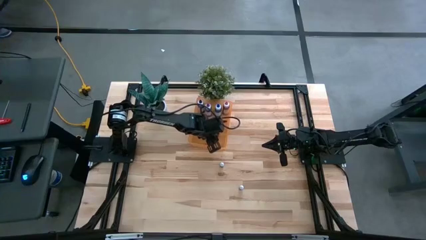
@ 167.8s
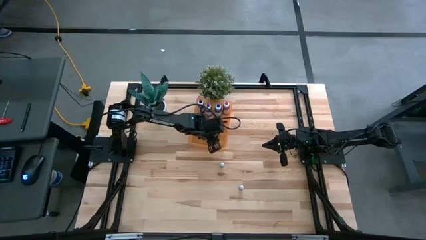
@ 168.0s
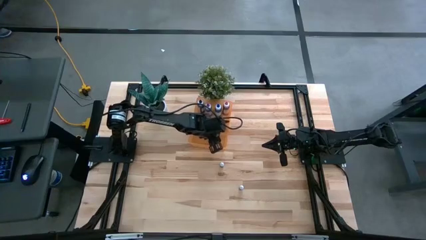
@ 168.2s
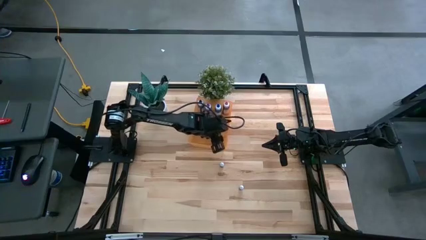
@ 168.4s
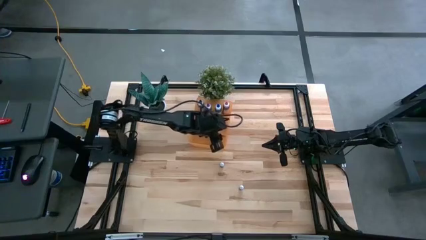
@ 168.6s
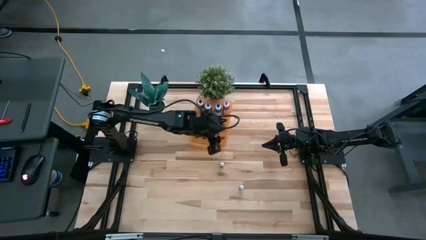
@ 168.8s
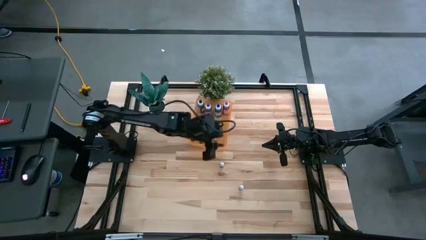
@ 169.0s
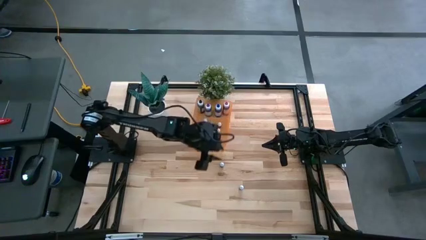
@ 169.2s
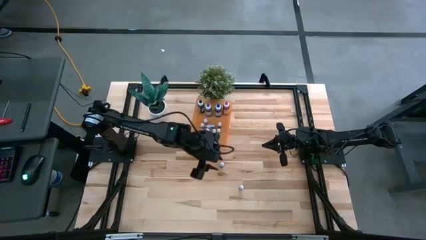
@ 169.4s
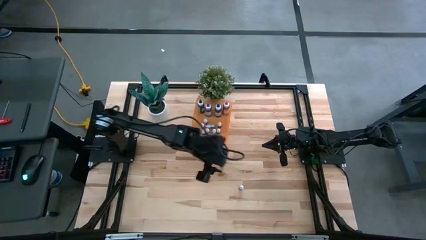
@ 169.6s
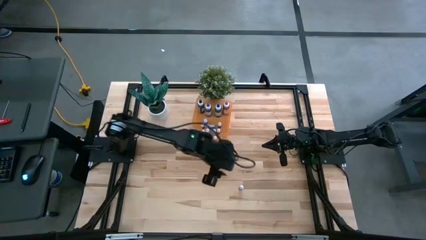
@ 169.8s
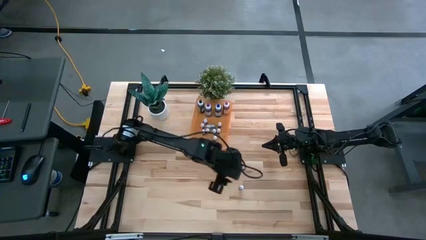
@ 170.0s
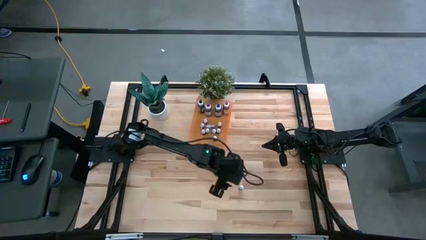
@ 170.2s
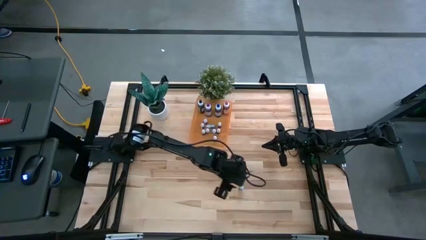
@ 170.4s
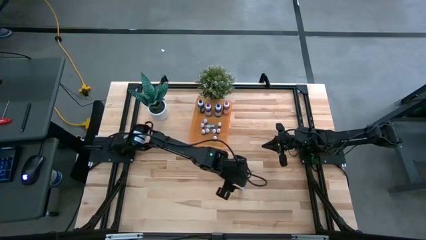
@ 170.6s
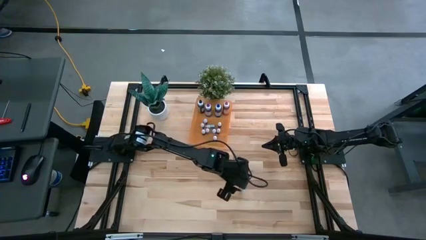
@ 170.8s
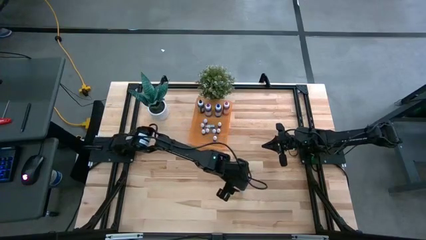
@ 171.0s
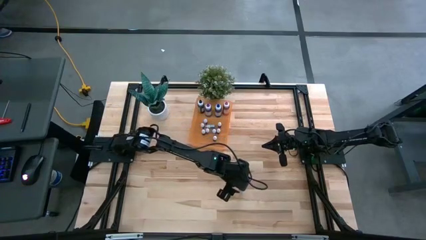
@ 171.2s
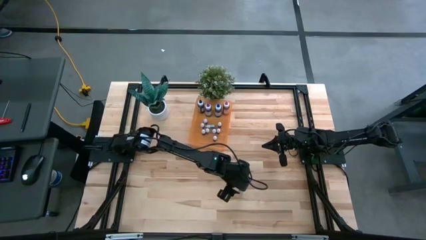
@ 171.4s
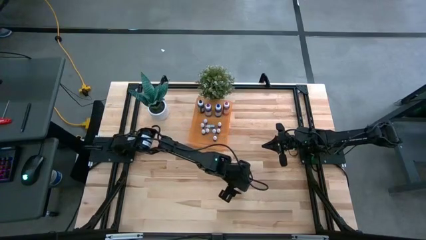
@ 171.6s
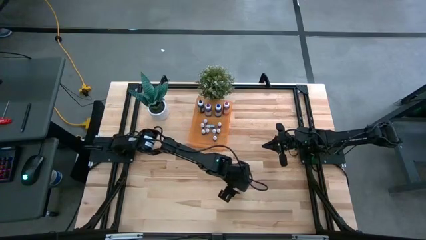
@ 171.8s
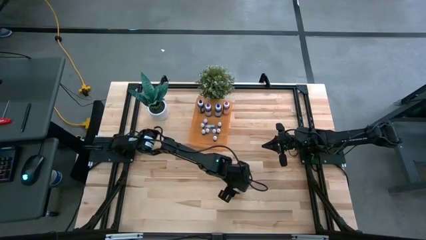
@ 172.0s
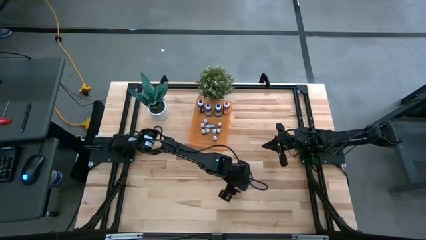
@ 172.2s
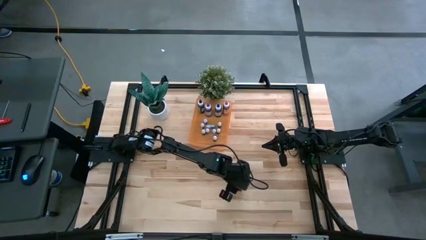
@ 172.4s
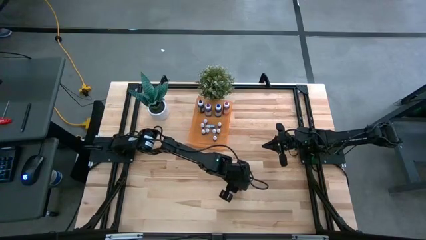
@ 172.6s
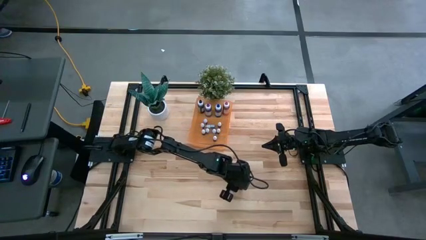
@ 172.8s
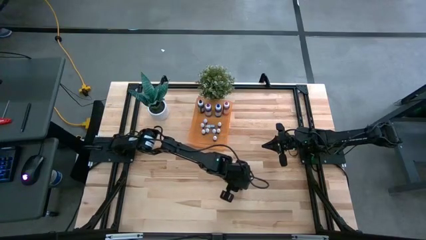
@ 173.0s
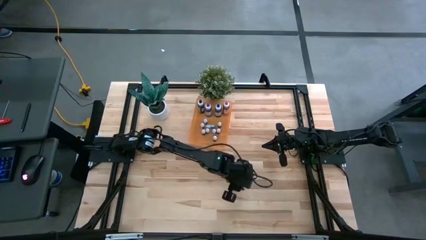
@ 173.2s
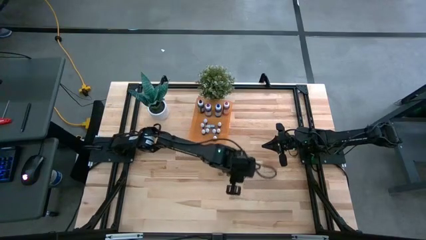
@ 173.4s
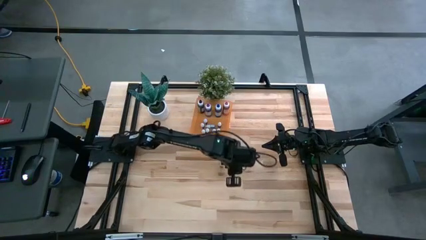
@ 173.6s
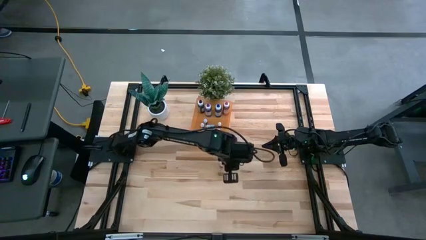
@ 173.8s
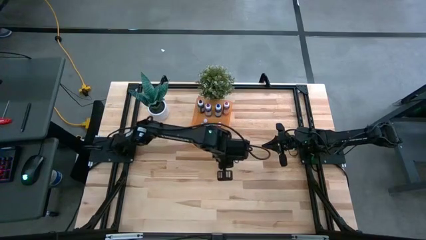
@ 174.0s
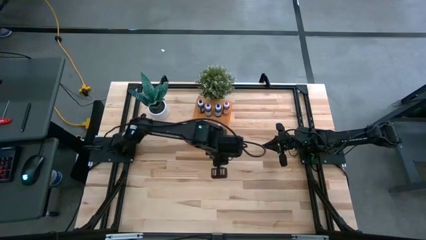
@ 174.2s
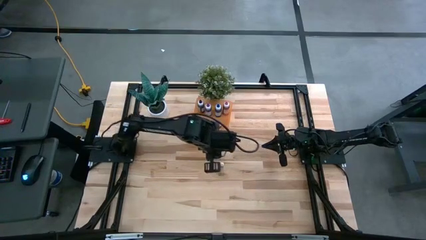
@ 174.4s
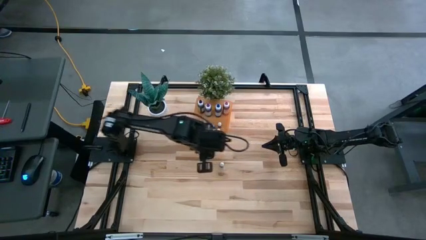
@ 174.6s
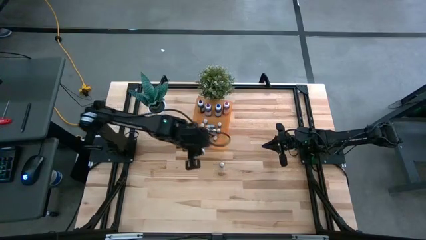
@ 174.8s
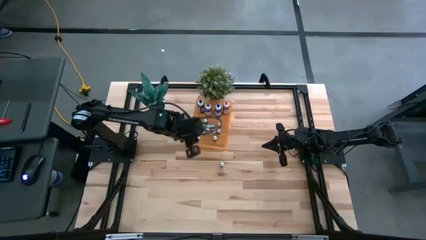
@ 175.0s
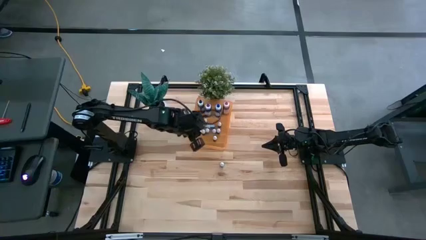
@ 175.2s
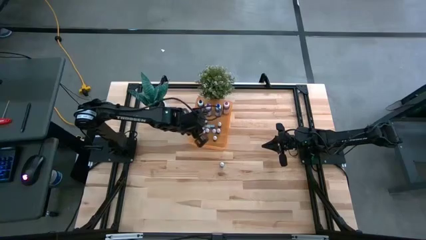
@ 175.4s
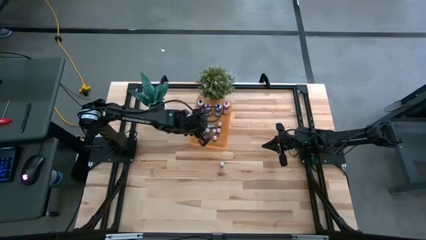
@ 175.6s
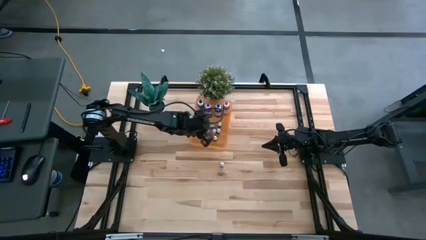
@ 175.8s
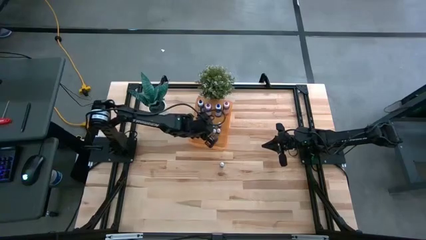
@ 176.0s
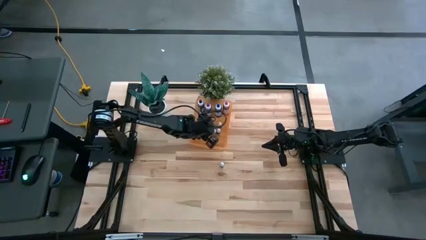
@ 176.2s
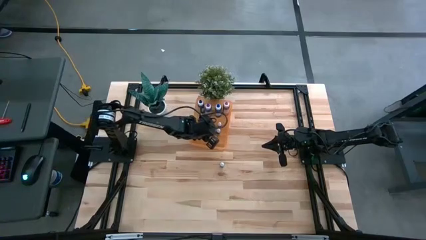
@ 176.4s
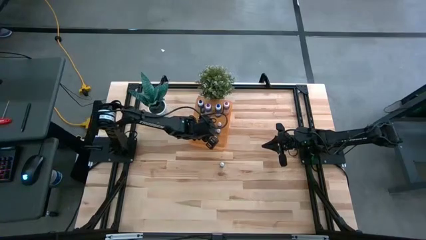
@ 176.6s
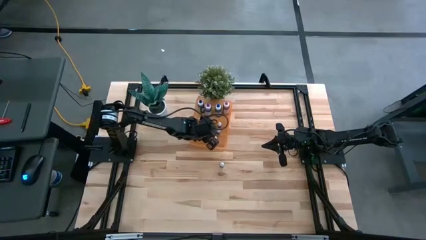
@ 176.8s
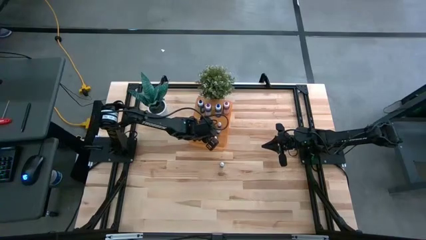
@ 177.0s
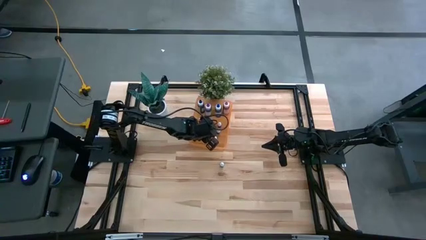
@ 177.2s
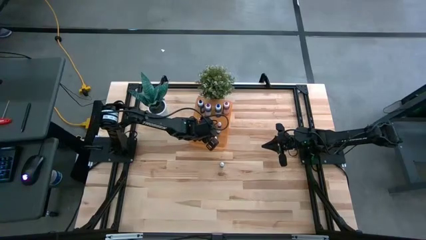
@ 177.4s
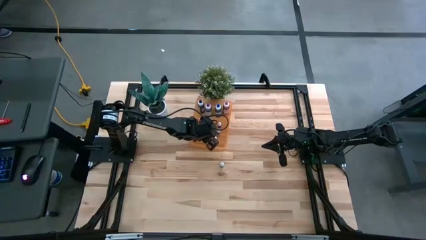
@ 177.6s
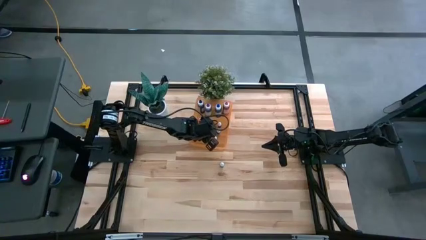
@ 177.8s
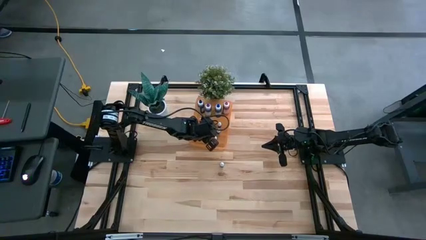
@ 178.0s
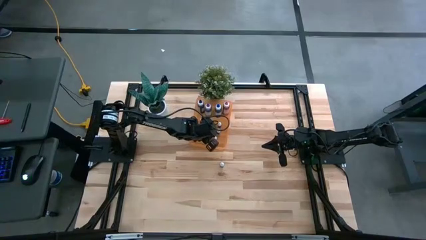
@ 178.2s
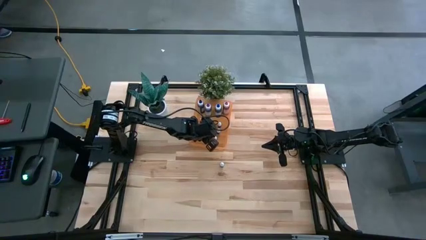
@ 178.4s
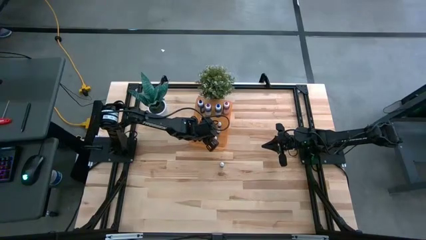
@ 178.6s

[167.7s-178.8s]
Task: Pick & Place food coloring
Put the small red food coloring bottle into the orange bin

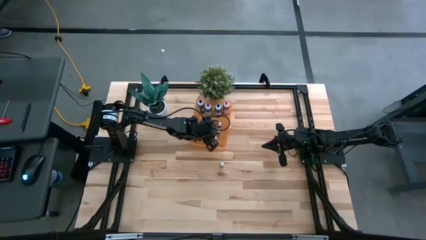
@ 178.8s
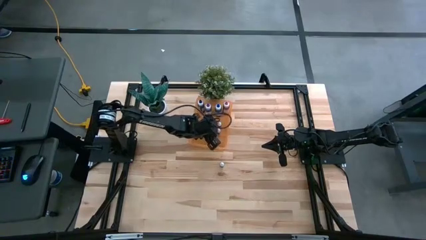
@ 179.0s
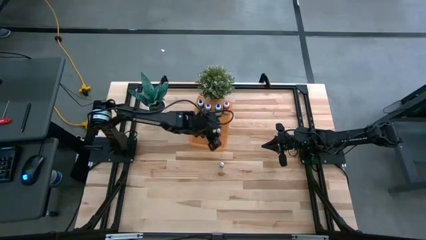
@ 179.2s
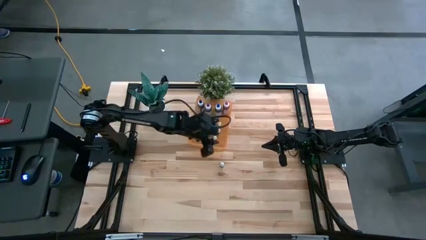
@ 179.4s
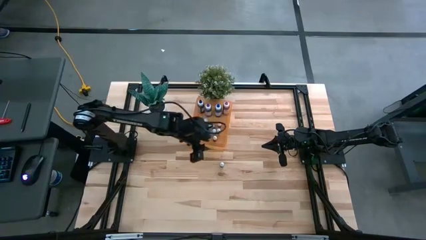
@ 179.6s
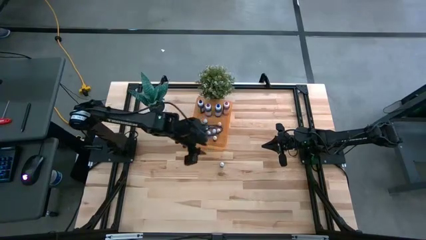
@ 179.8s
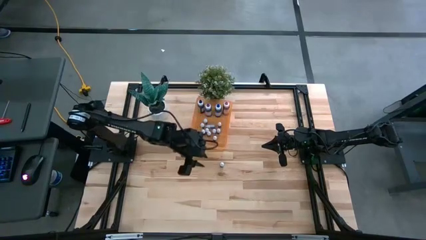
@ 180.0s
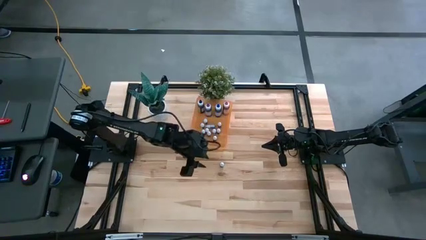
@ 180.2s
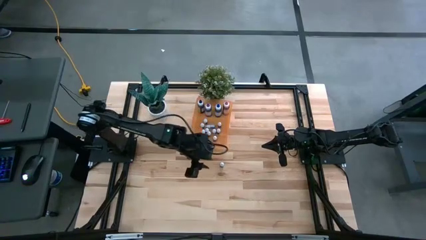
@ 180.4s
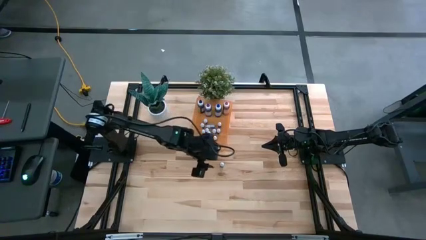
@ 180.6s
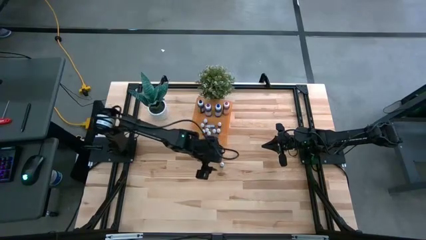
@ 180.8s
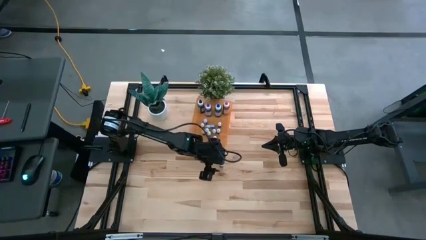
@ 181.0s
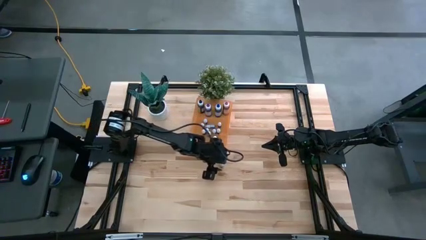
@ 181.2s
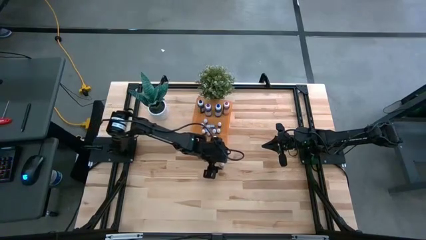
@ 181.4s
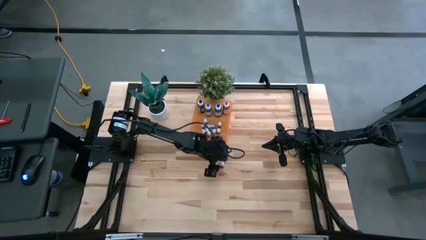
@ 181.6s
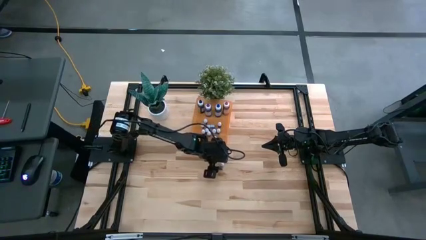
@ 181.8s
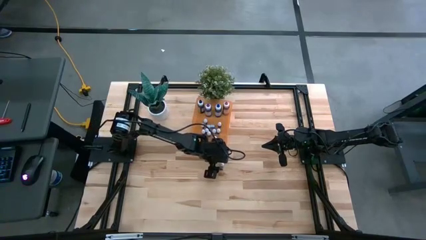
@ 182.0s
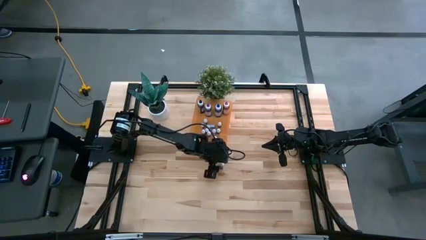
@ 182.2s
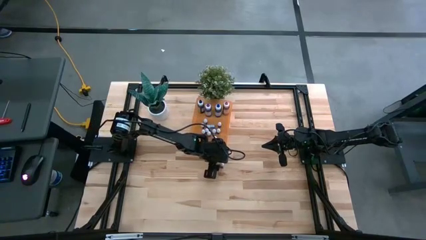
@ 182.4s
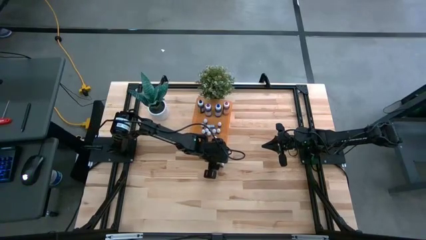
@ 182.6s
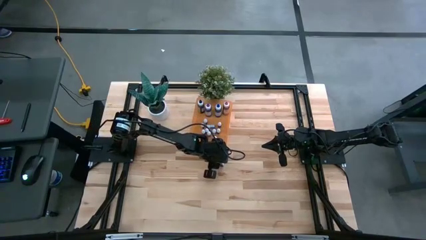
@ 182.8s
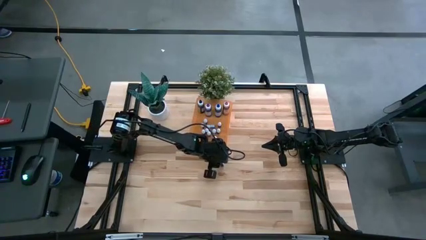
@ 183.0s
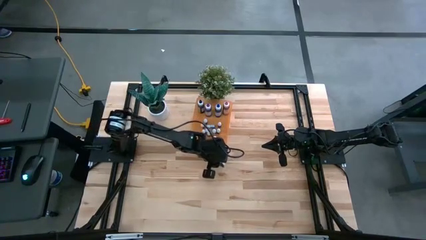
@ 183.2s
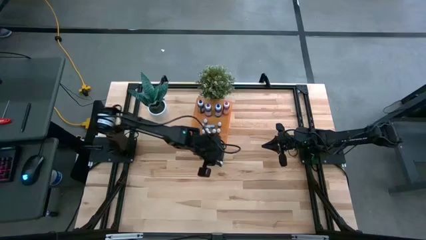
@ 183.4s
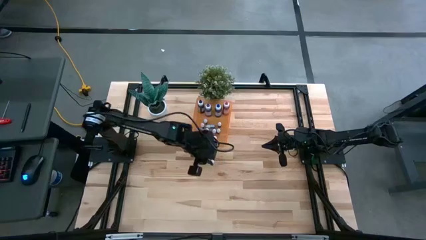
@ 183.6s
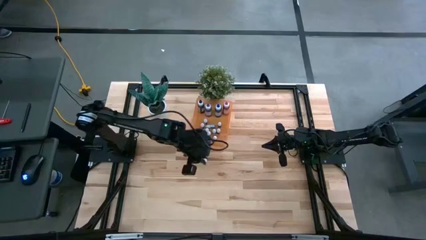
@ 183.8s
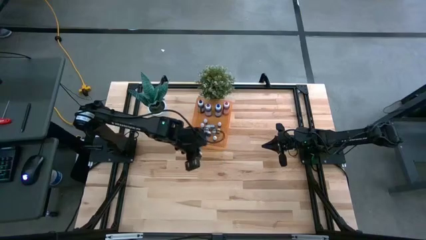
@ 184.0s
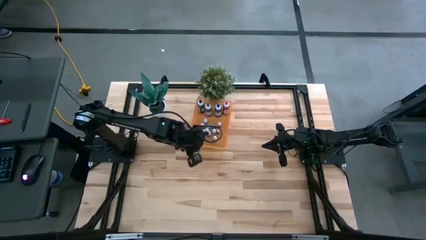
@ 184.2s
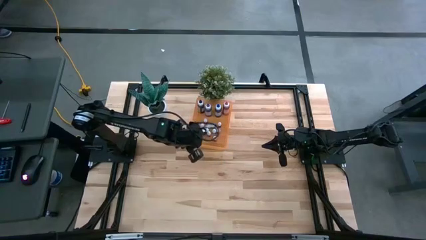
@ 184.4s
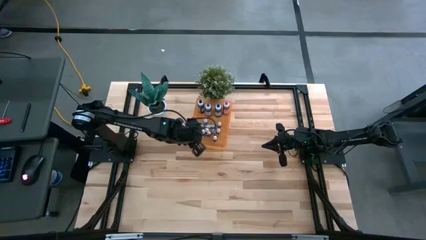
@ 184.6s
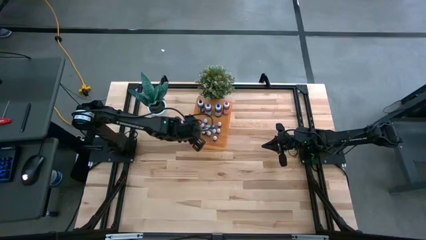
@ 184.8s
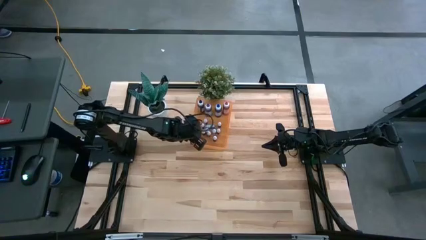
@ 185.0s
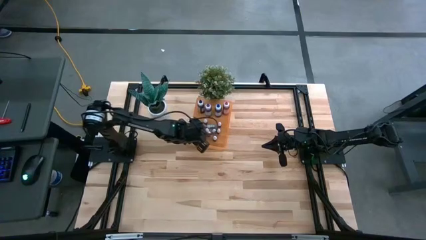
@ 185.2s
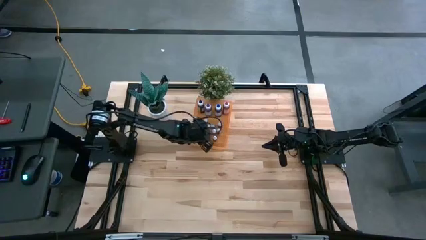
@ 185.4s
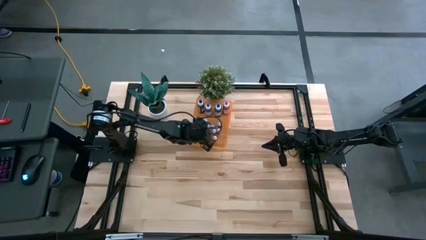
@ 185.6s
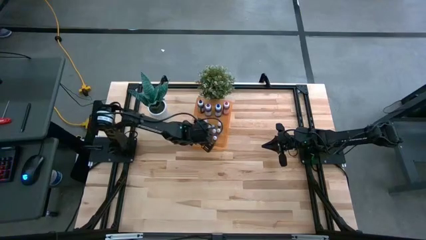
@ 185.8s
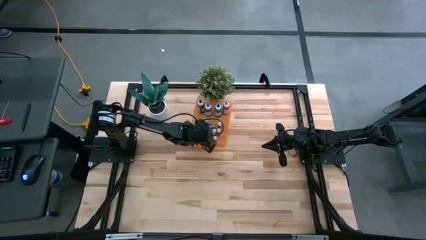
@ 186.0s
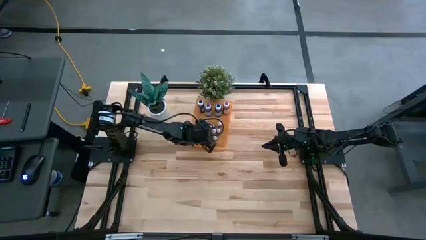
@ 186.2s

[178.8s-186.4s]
Put the small brown food coloring bottle into the orange bin
